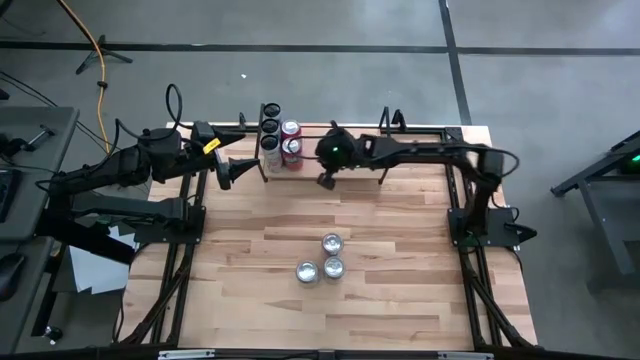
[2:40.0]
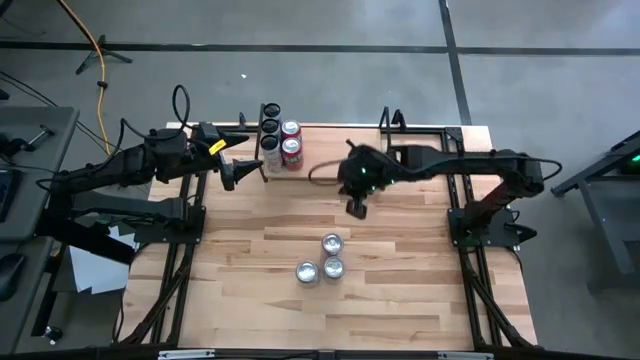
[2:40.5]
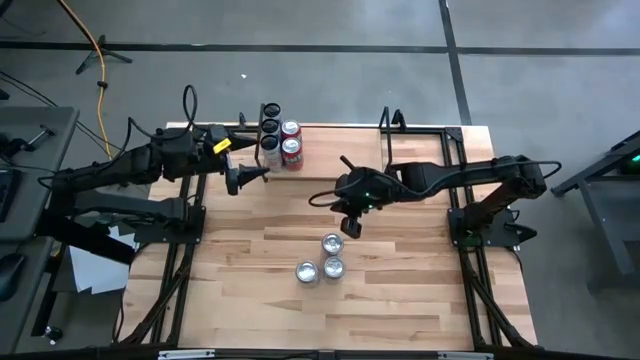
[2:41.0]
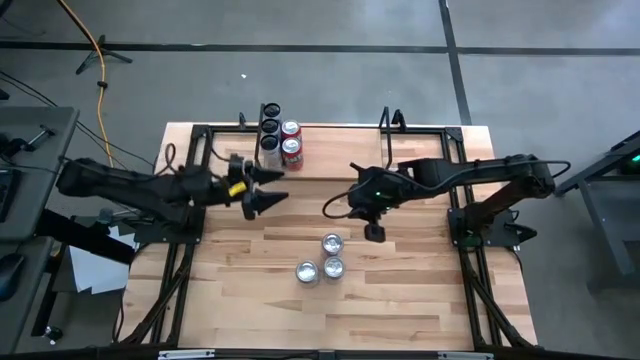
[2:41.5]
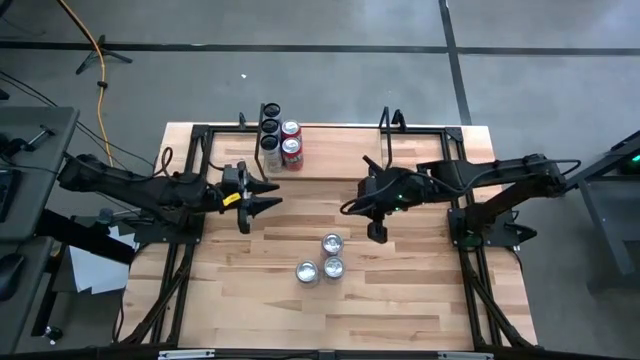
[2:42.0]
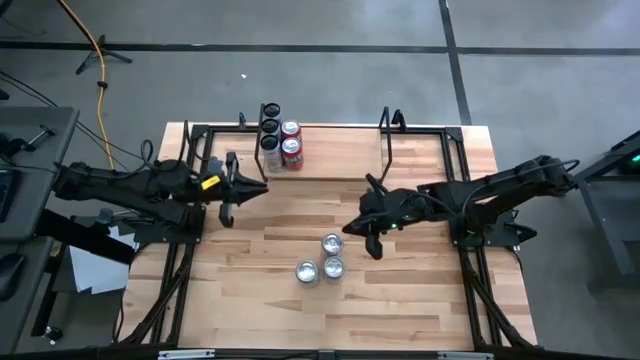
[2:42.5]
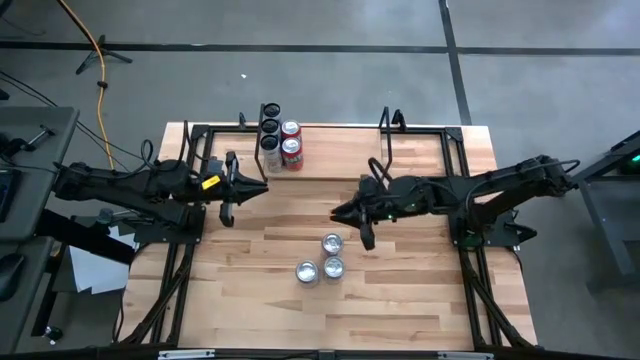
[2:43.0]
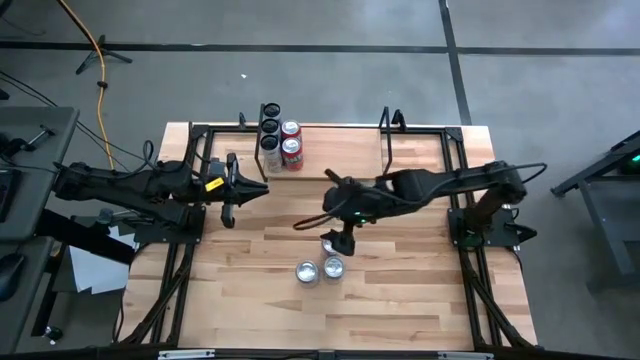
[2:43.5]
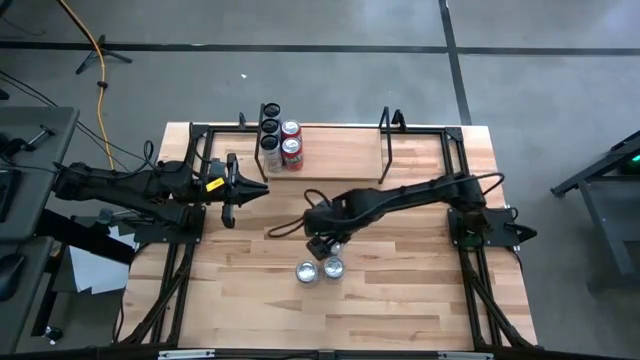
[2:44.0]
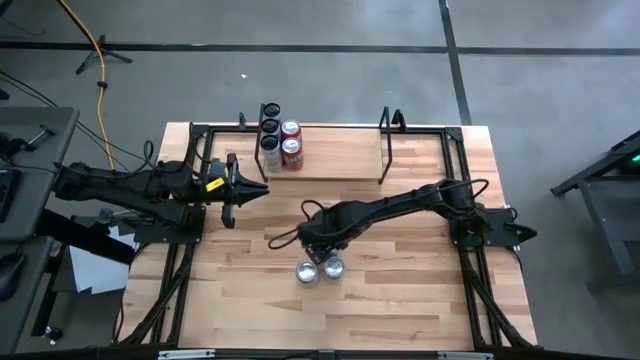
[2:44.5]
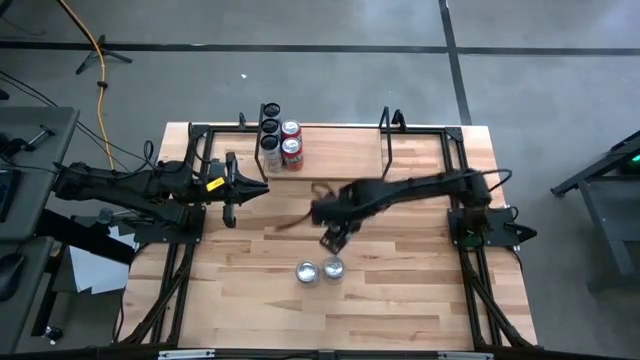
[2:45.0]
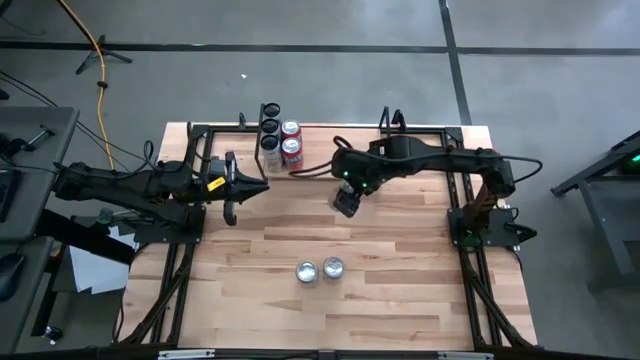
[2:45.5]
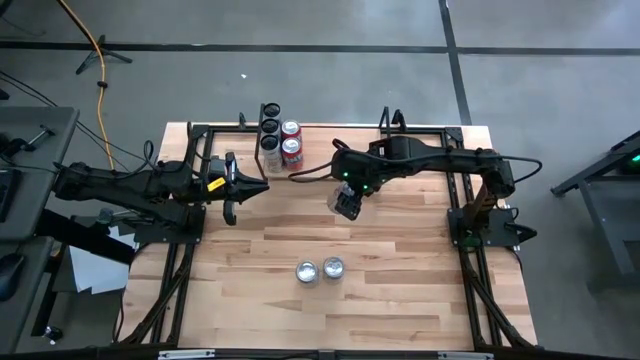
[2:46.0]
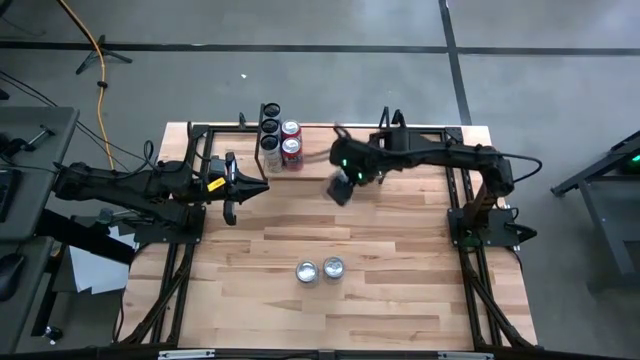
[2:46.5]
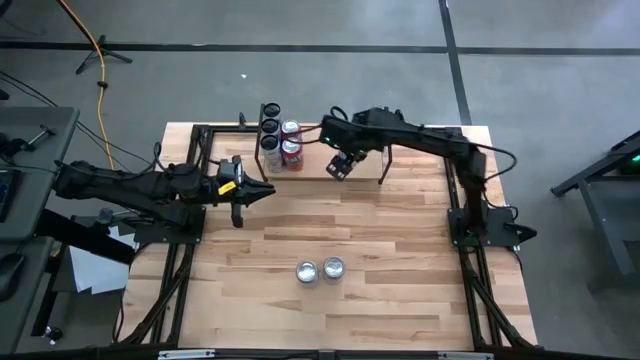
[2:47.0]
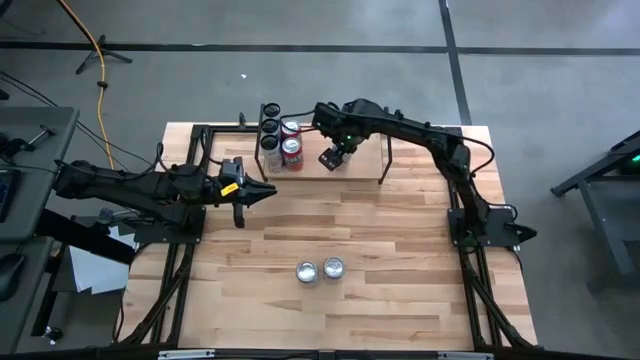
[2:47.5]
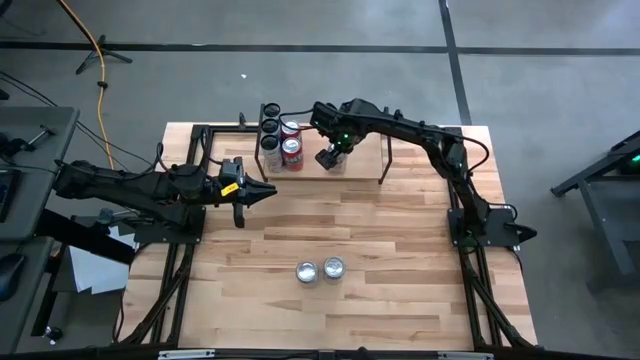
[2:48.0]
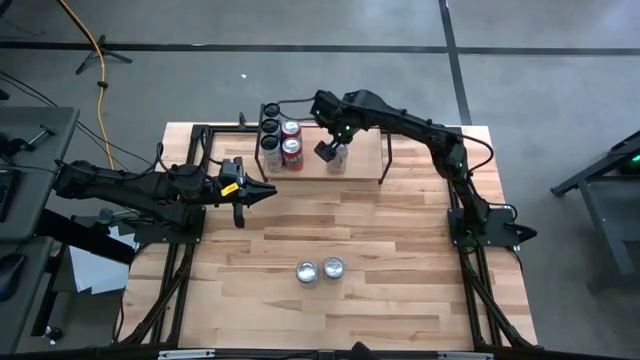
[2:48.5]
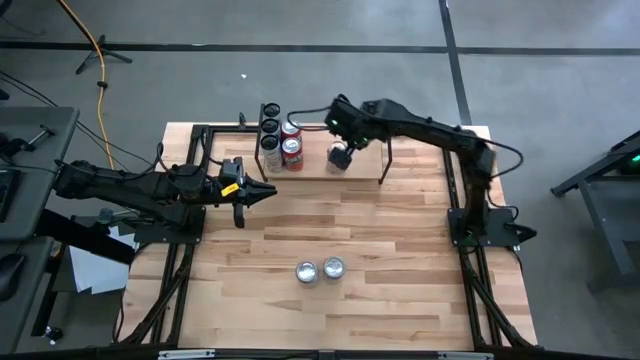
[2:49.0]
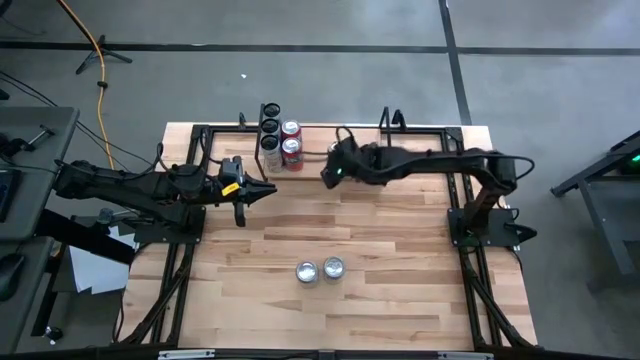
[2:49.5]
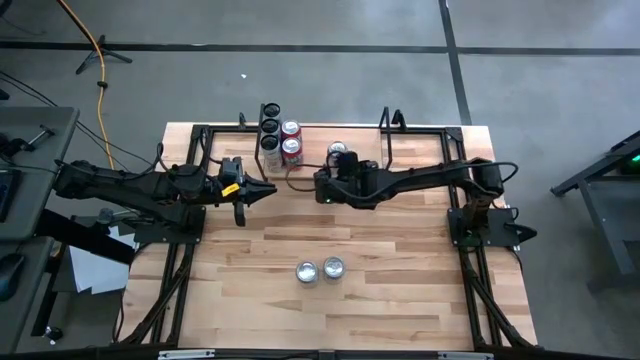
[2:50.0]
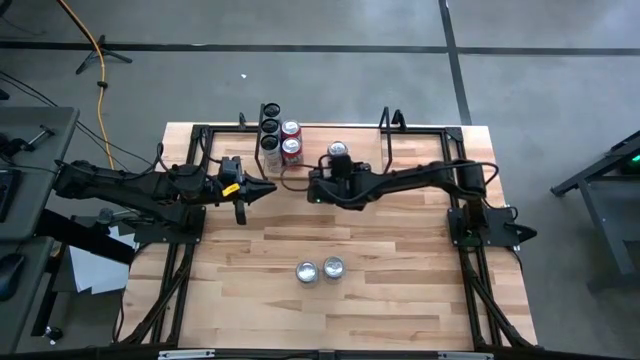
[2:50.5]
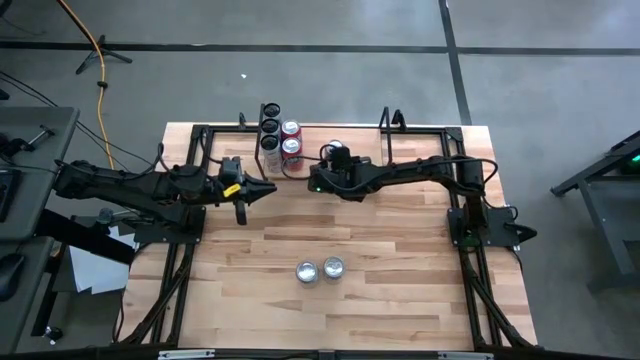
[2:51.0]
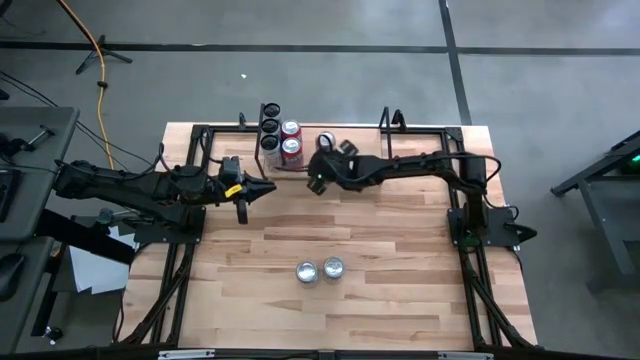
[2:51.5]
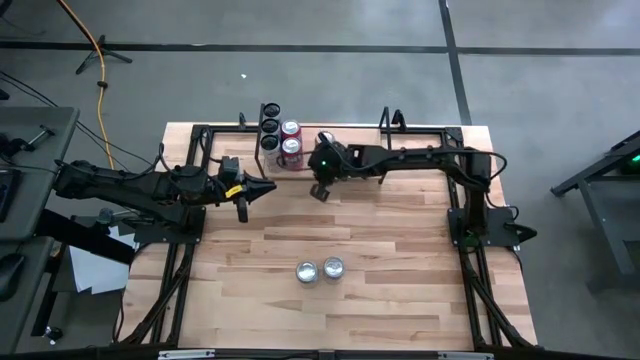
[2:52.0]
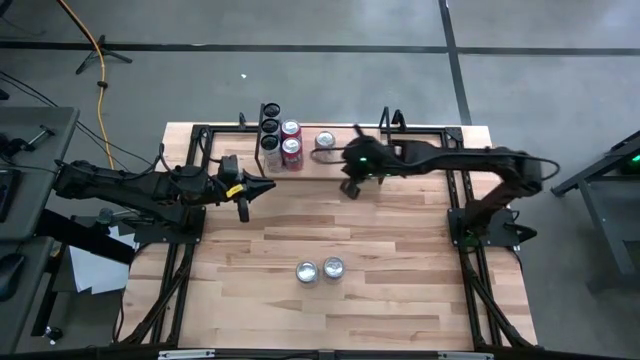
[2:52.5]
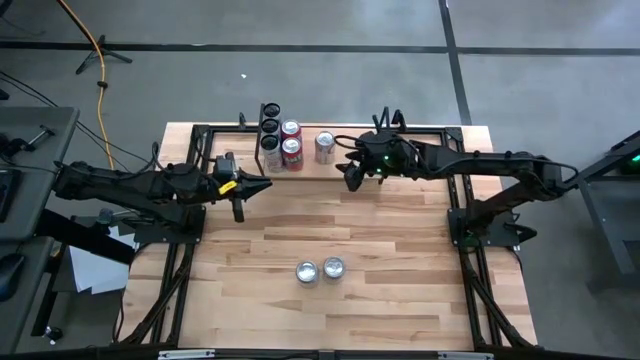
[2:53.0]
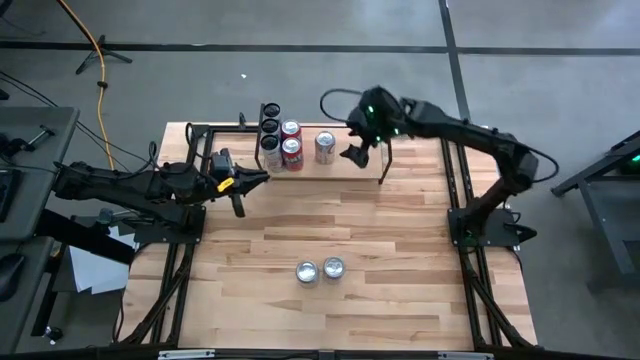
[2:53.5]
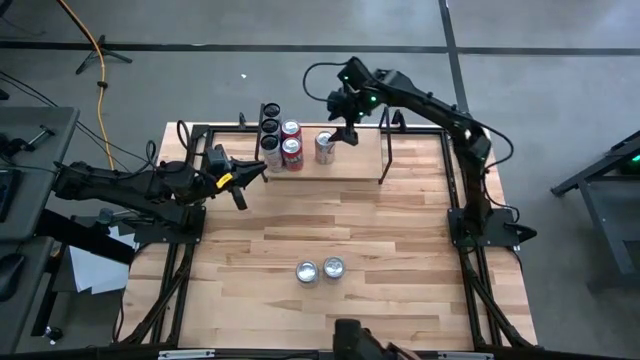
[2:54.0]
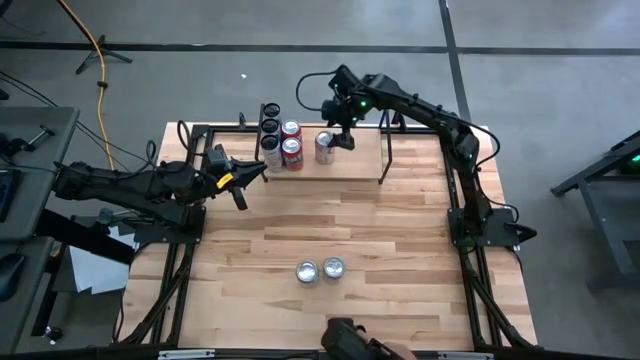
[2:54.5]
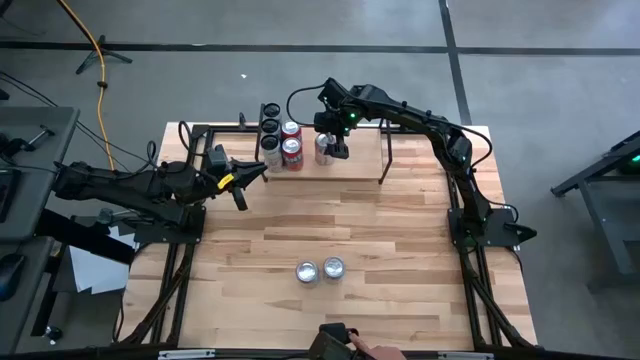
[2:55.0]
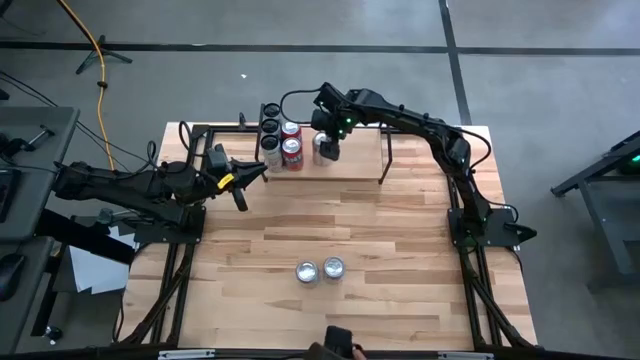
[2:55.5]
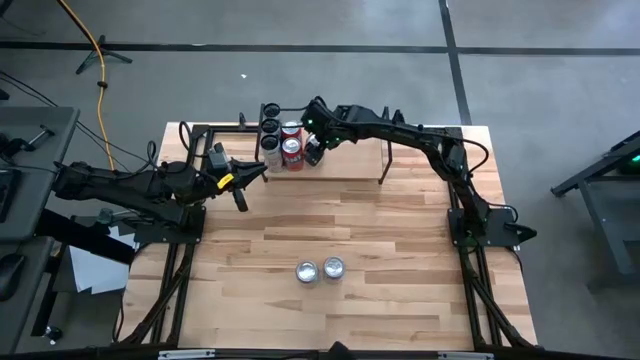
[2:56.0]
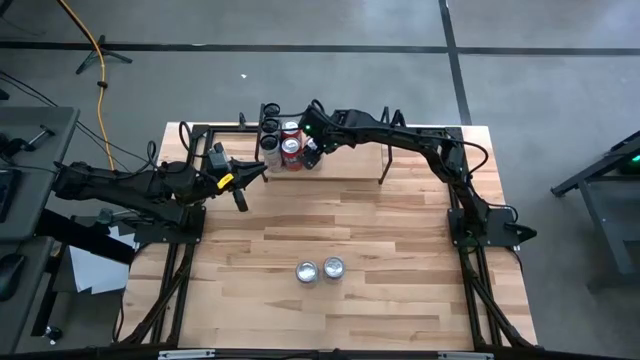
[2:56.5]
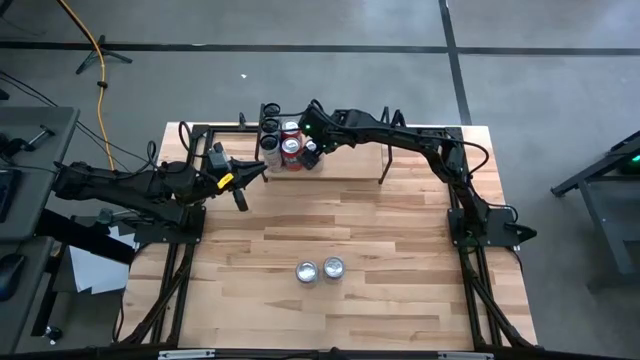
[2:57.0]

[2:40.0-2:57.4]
Task: Place canned beverage on shelf
Put the top right silver soda can on the shelf

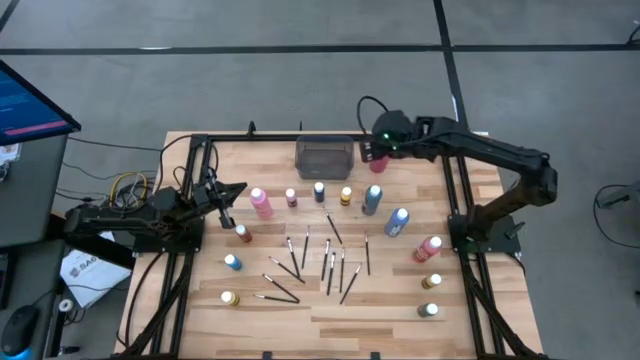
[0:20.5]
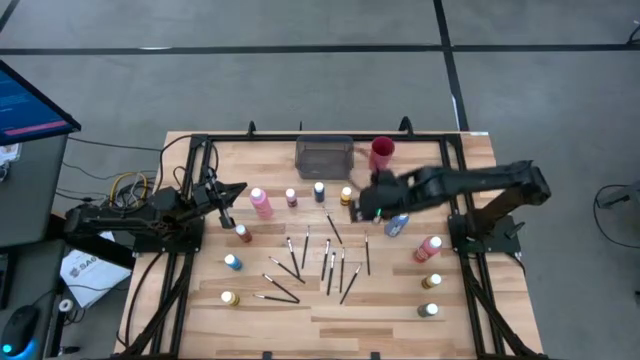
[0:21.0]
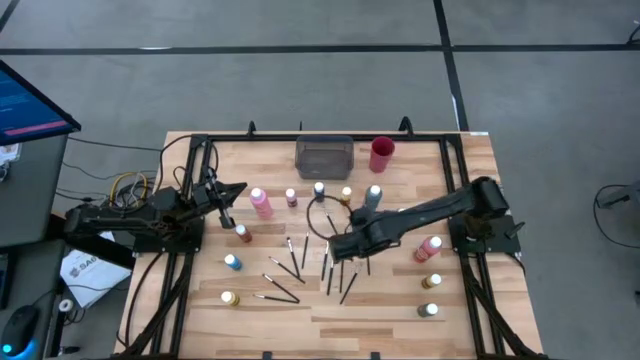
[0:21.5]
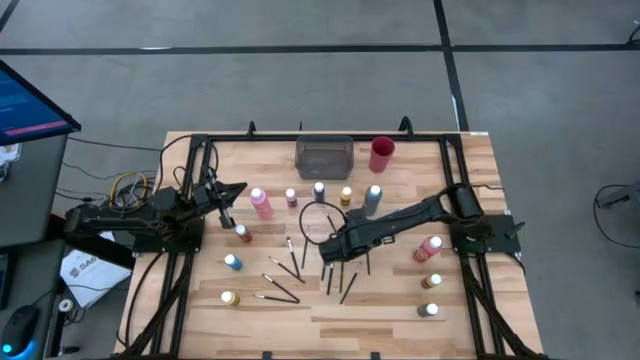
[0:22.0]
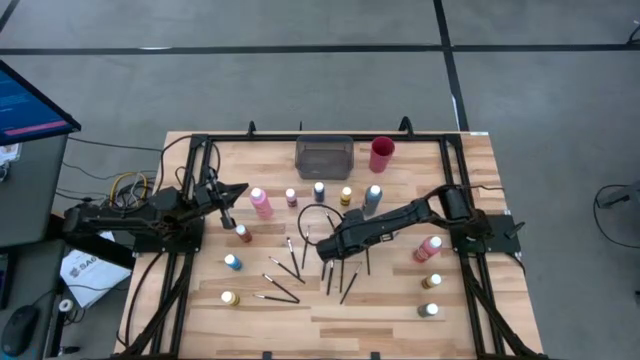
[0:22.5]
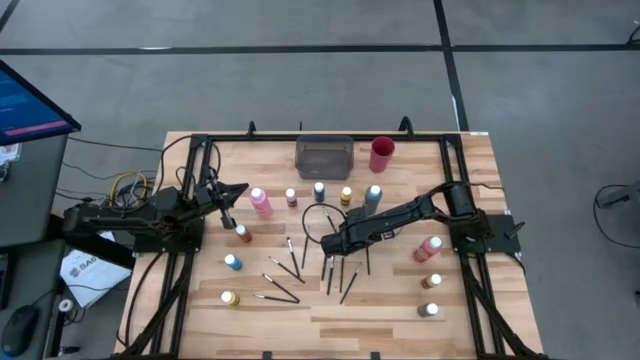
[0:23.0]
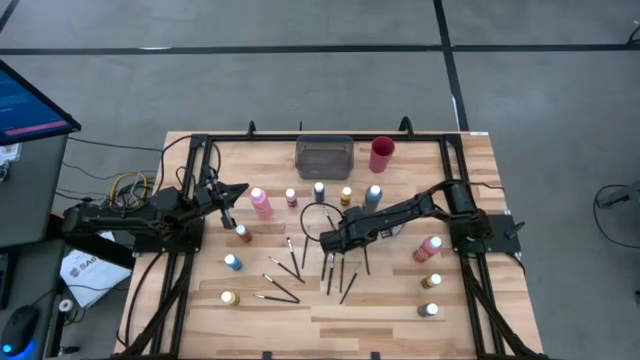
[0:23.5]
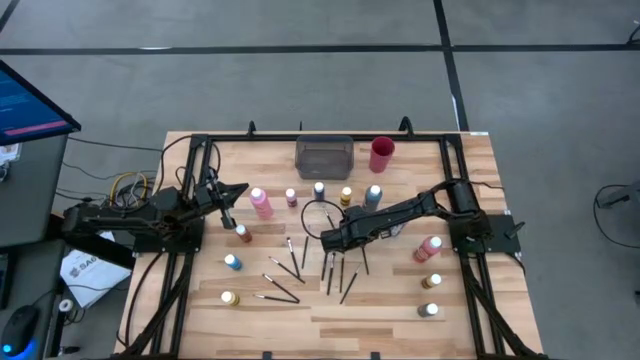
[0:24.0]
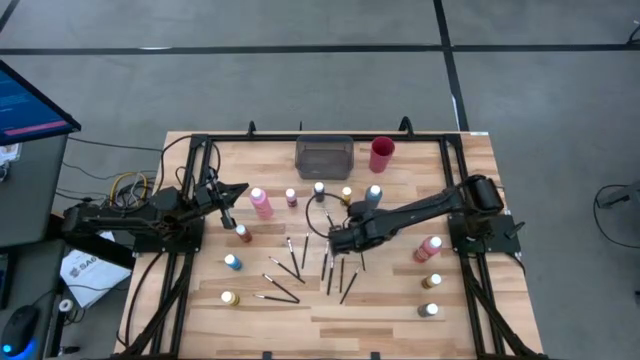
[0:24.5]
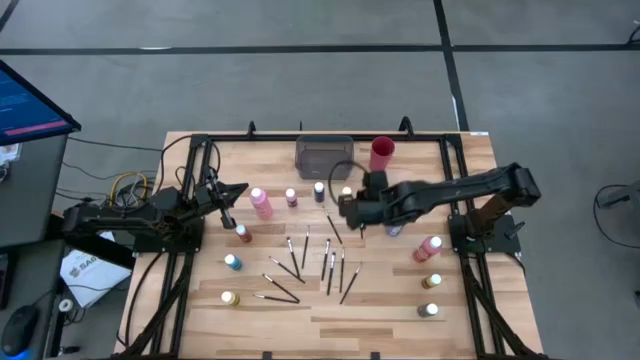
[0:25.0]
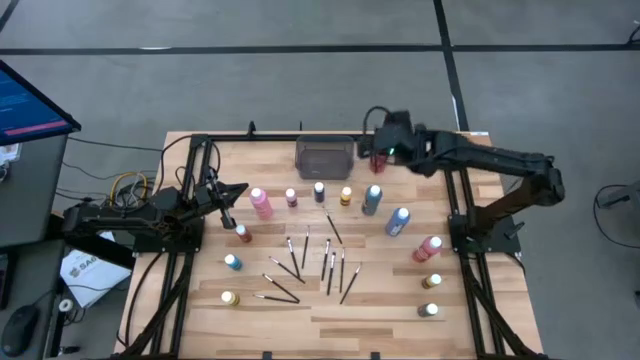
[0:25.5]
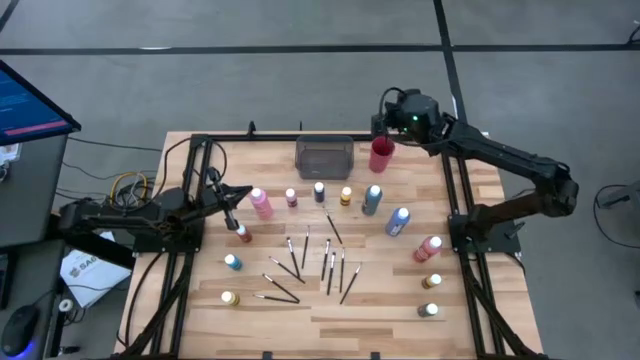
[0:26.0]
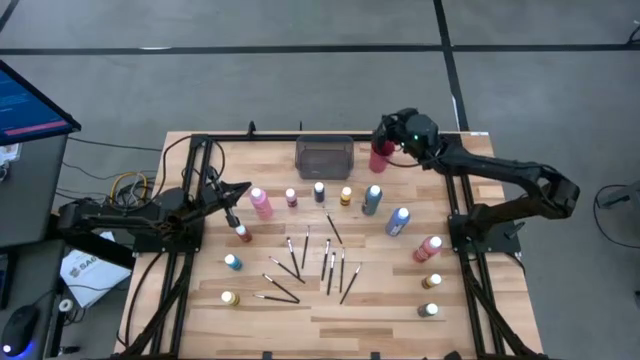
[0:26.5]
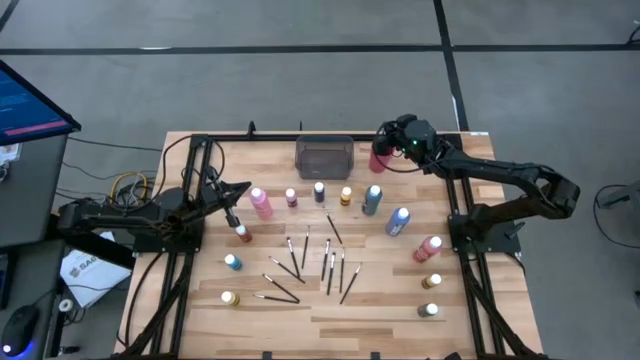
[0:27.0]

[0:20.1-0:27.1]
Task: Pick & Place Paint Supplies
Put the black paintbrush into the red cup
